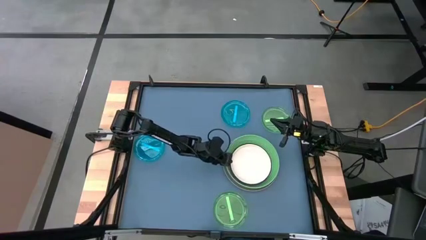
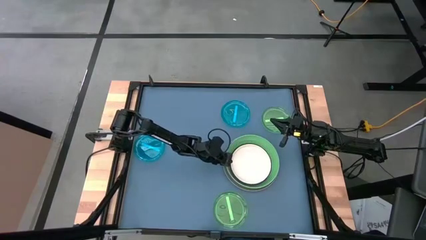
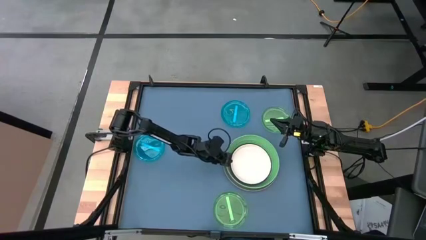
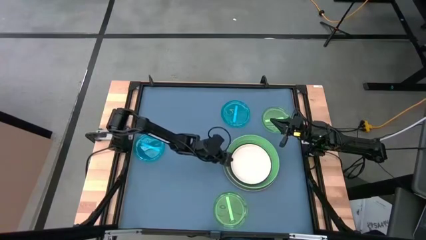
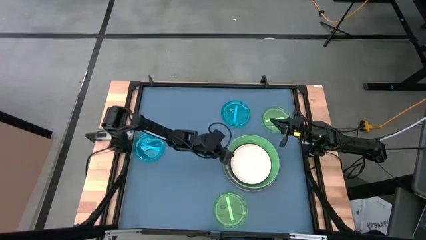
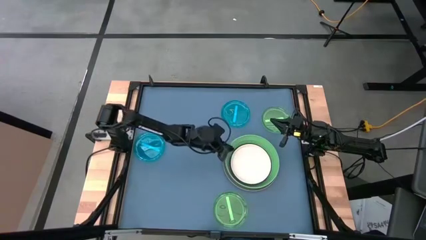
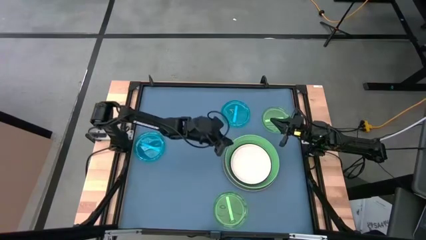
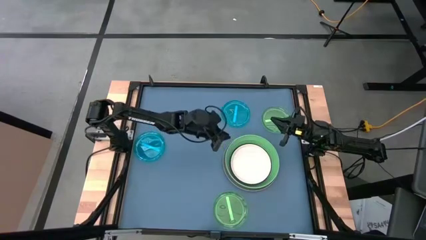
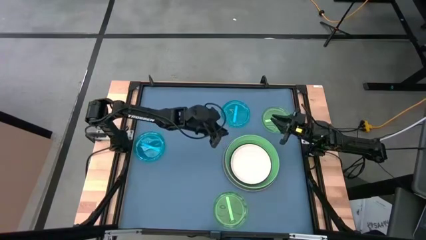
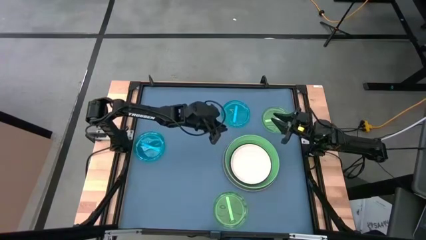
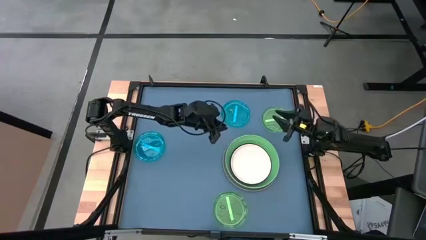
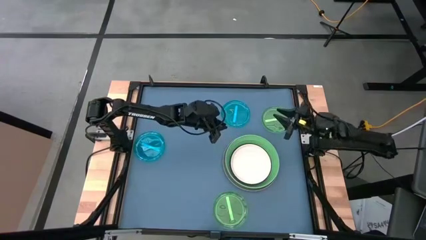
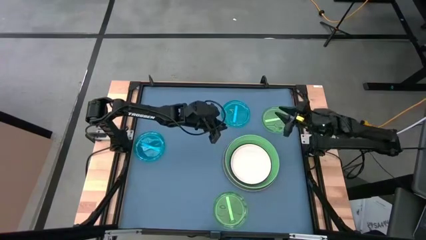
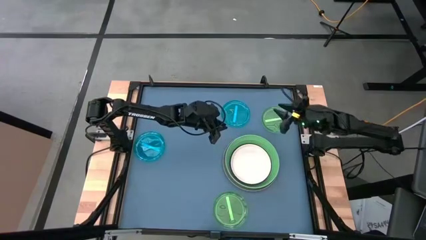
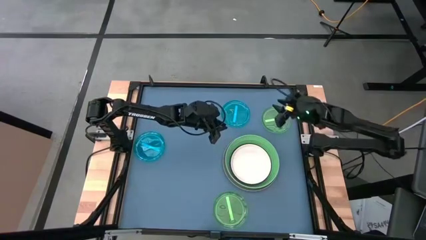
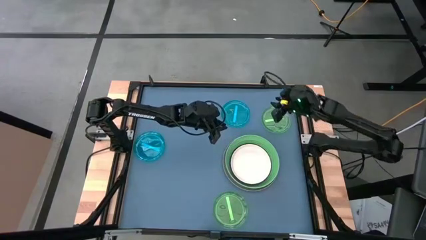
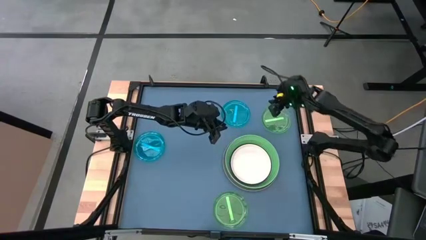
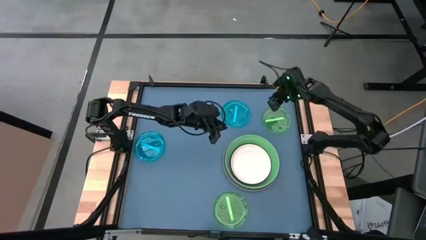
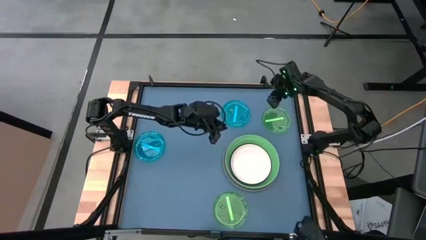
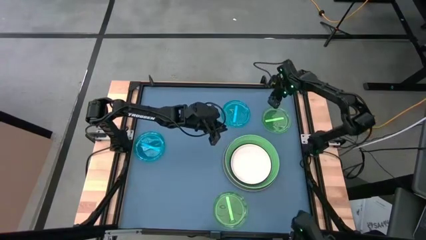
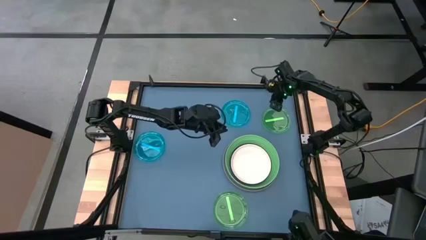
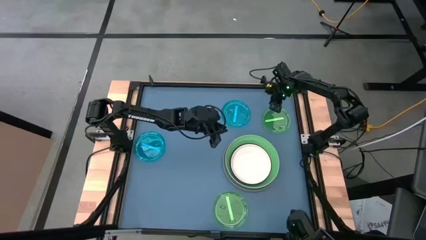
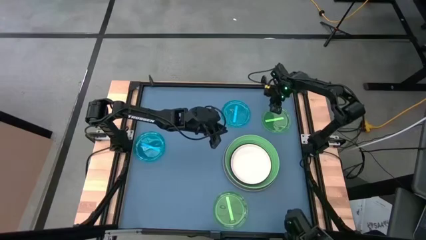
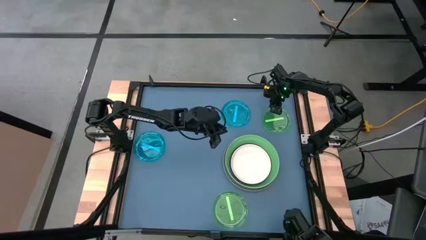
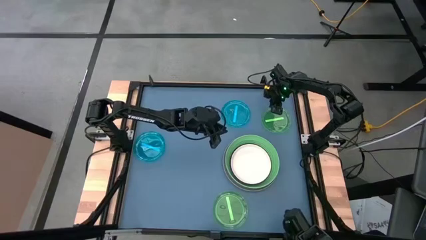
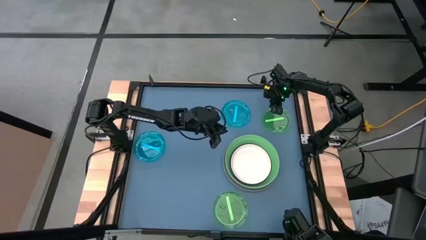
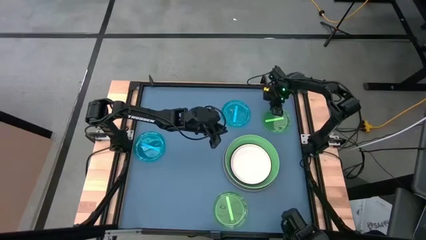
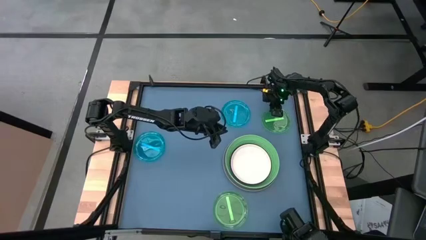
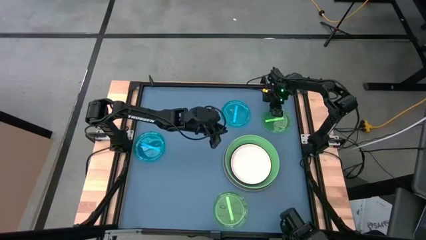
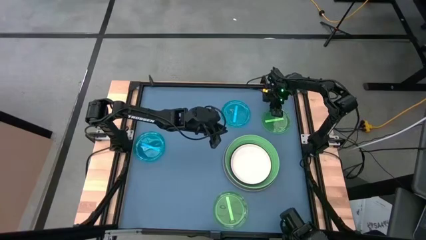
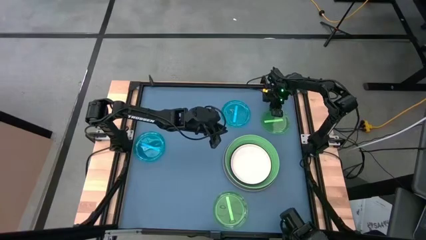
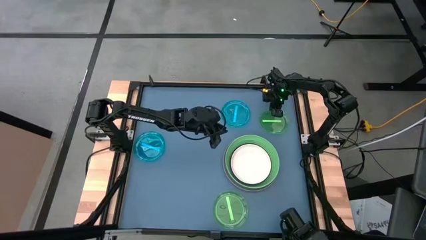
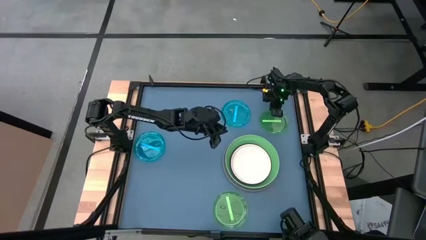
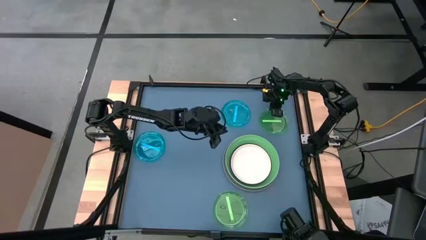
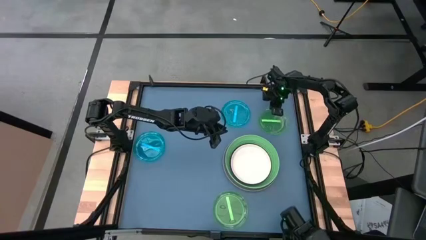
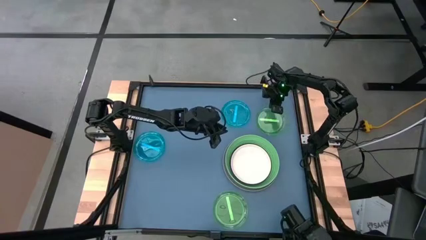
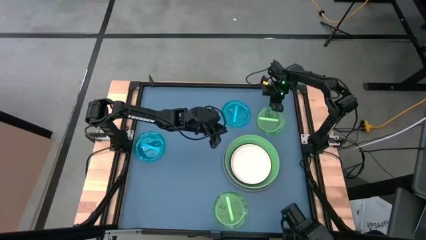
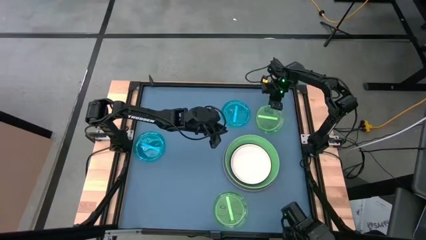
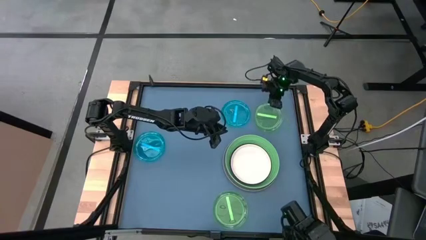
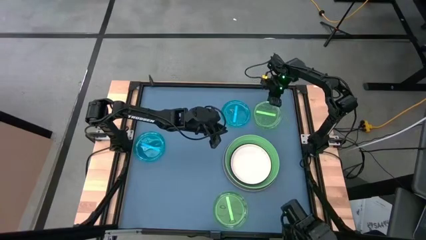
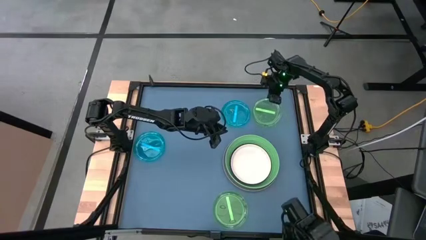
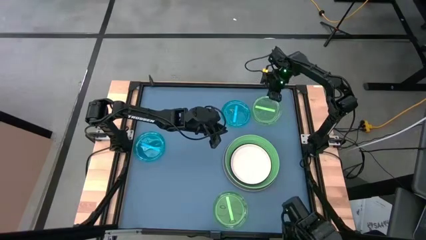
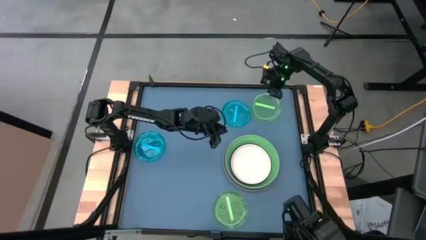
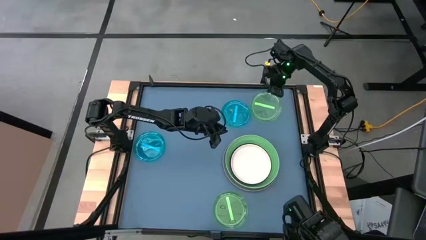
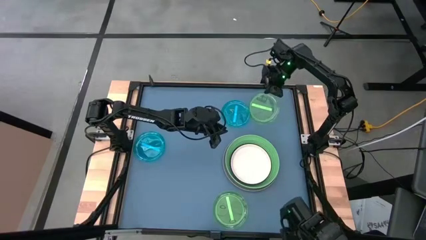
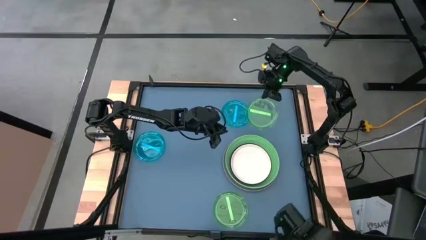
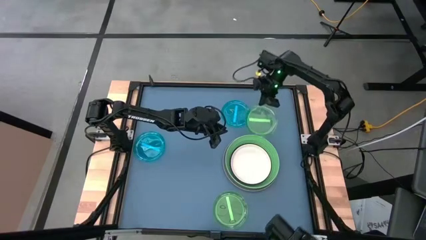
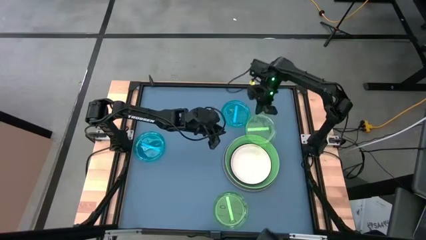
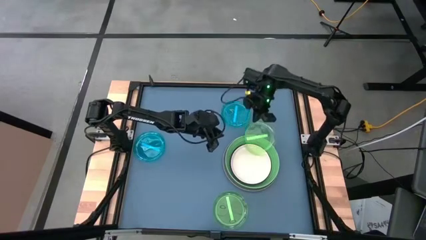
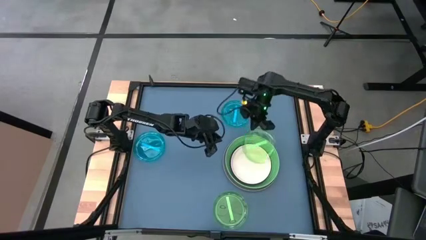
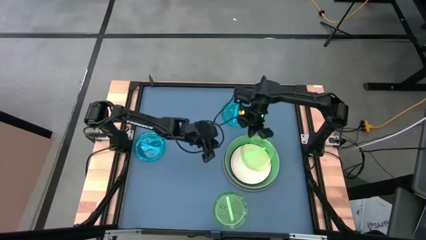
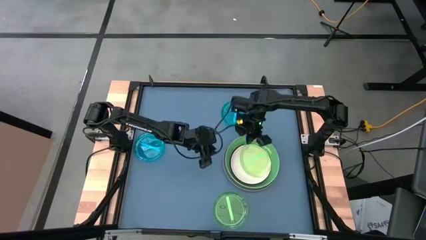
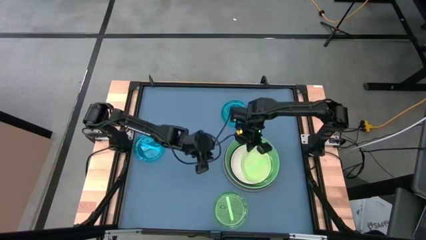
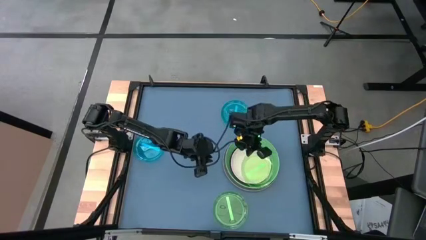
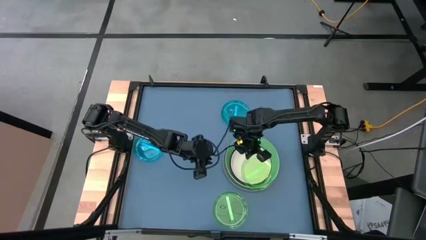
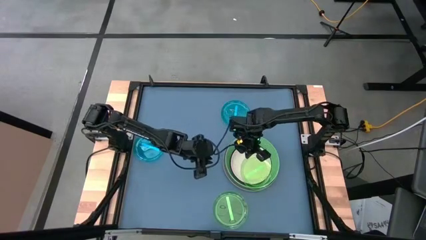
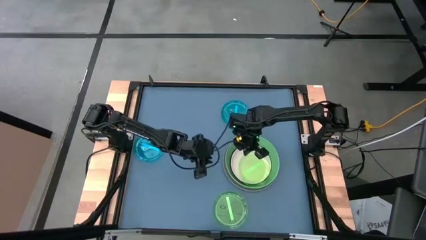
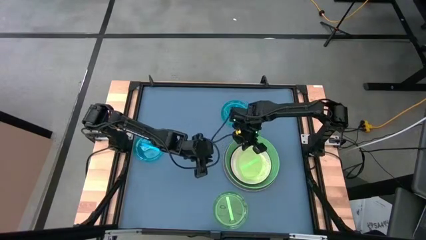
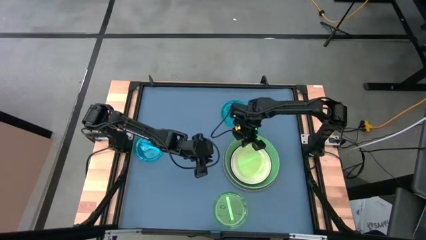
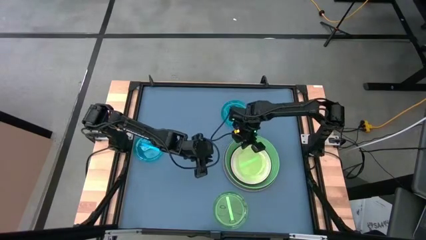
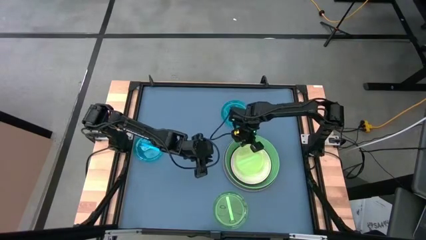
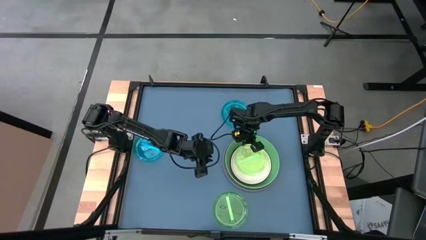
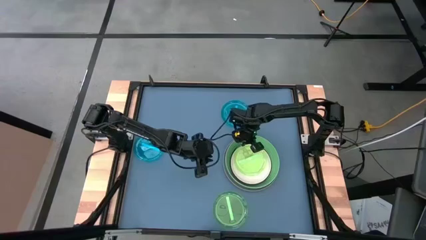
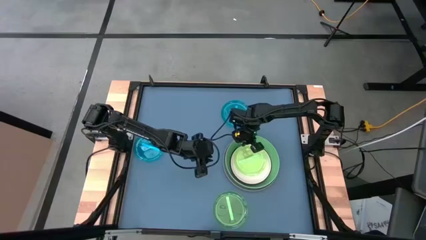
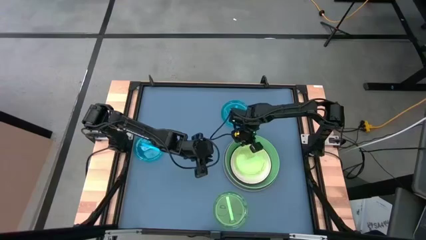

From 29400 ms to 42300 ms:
Task: Stack plastic plates
Stack the top green plate on the white plate
